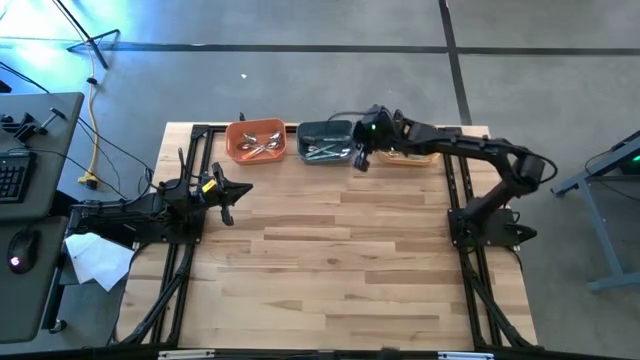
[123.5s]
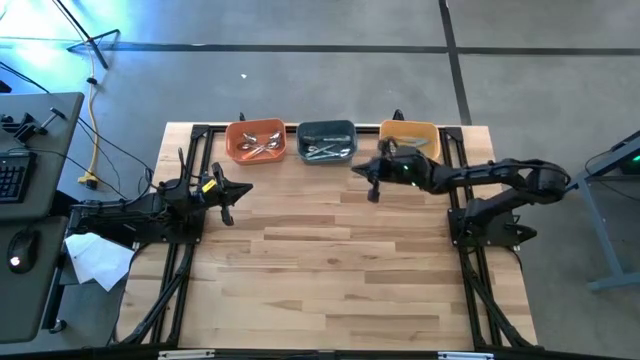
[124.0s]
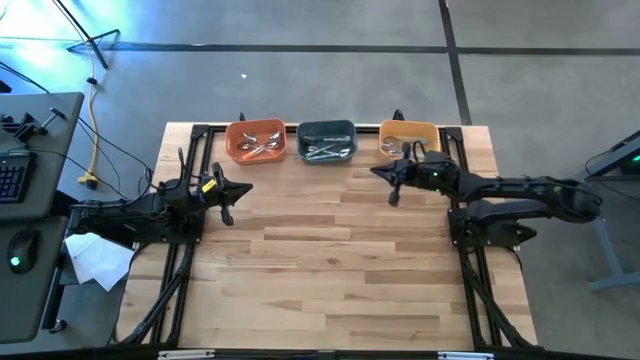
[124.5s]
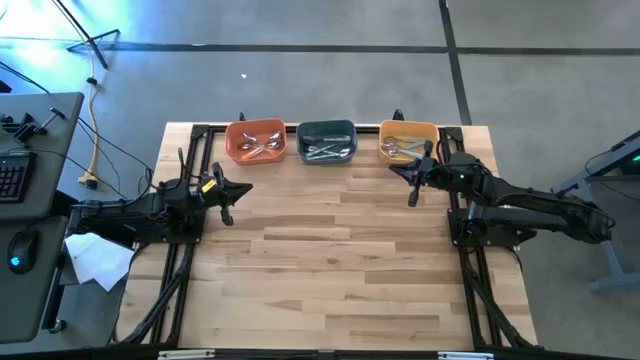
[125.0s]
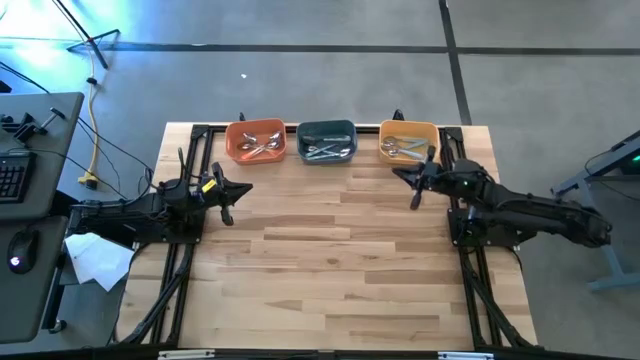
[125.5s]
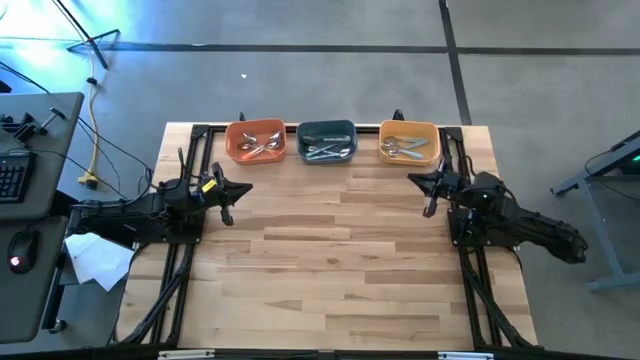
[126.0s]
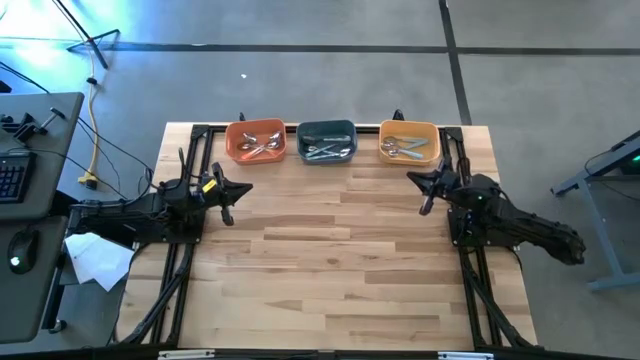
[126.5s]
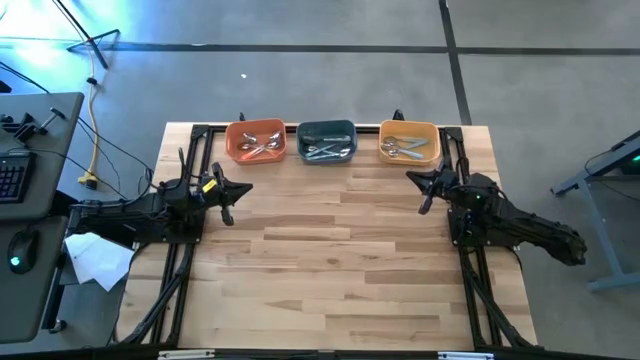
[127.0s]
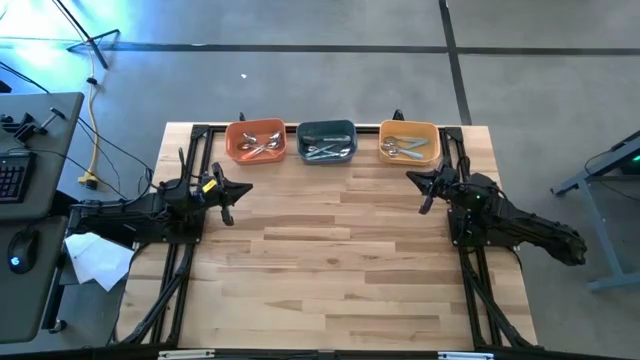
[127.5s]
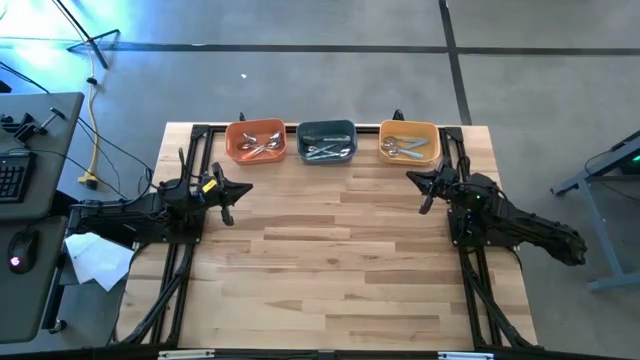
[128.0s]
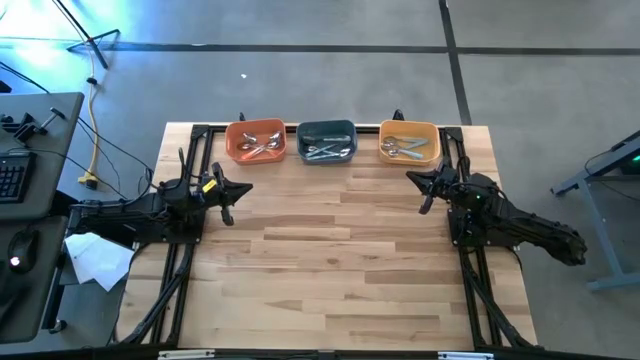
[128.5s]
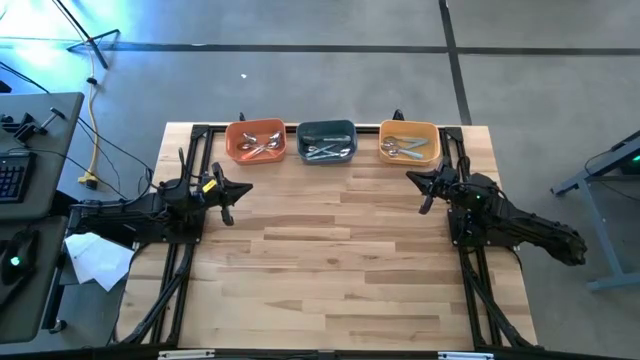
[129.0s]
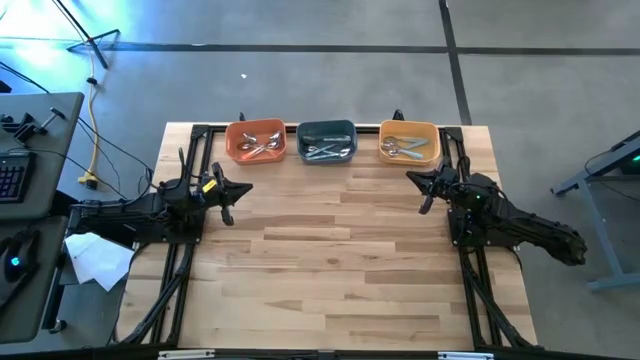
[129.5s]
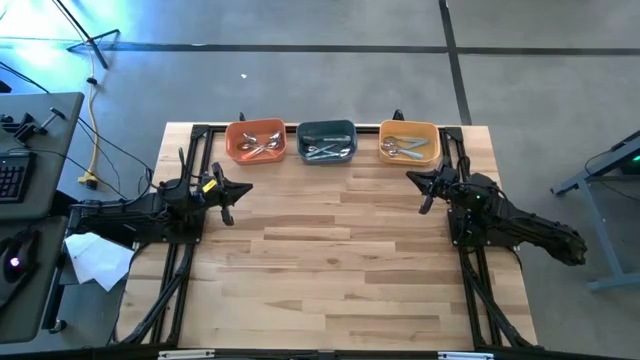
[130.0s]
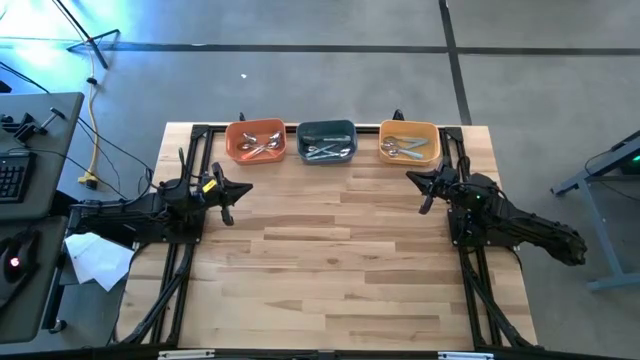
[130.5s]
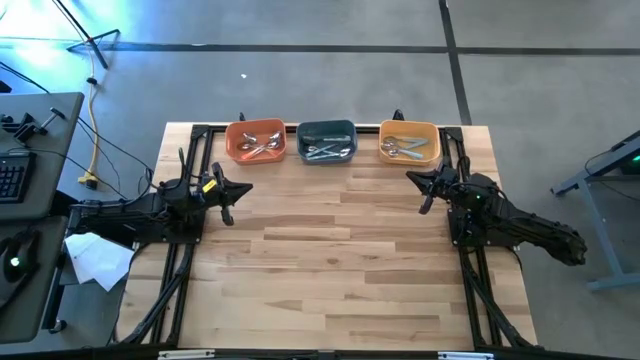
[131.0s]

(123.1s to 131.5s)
Task: Sort silverware by color (type)
Return to Home Position

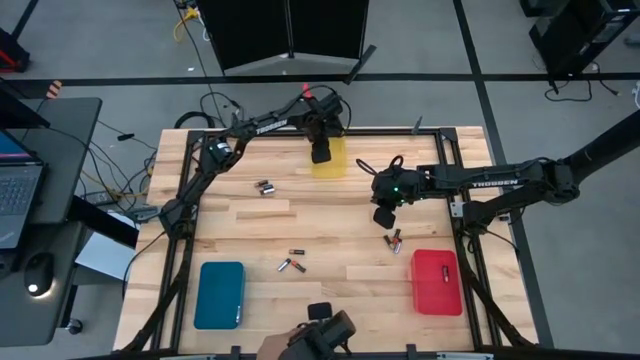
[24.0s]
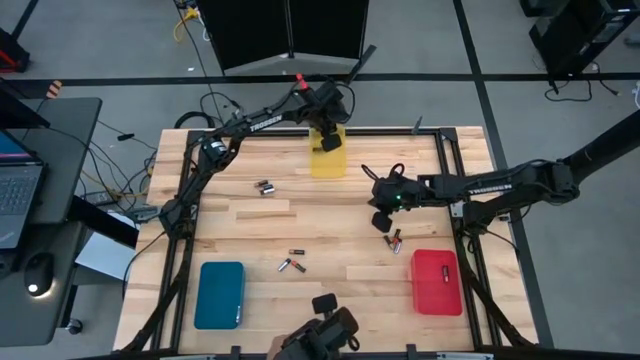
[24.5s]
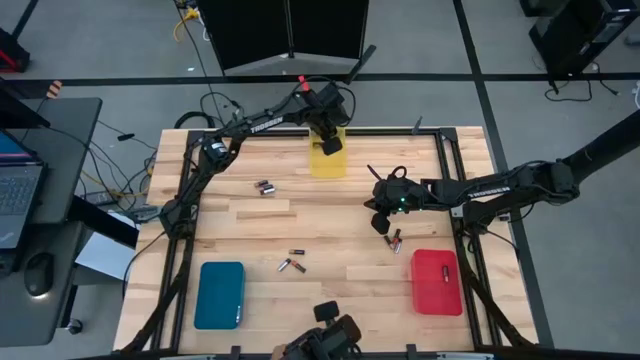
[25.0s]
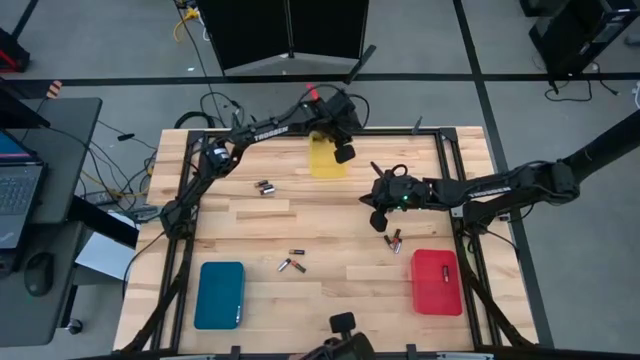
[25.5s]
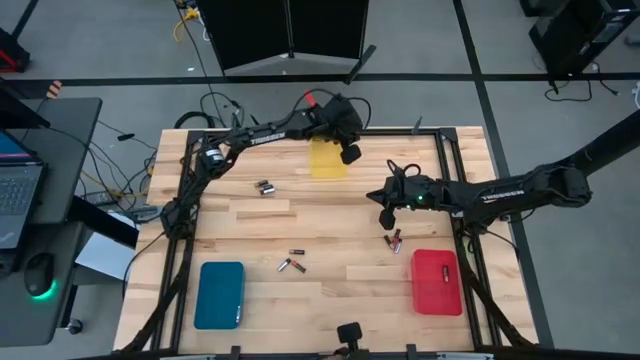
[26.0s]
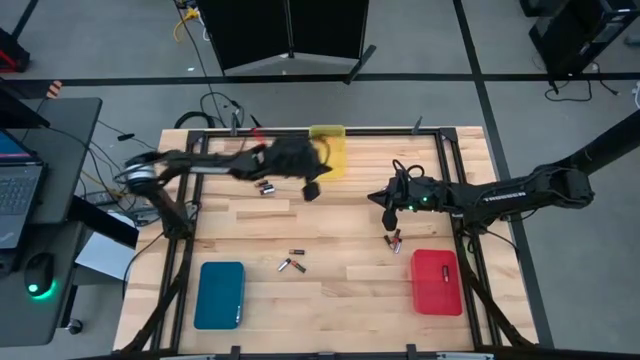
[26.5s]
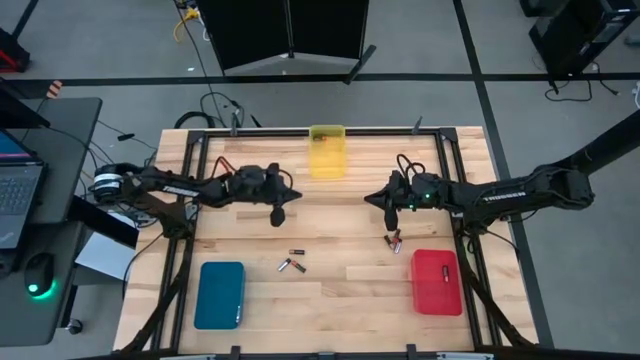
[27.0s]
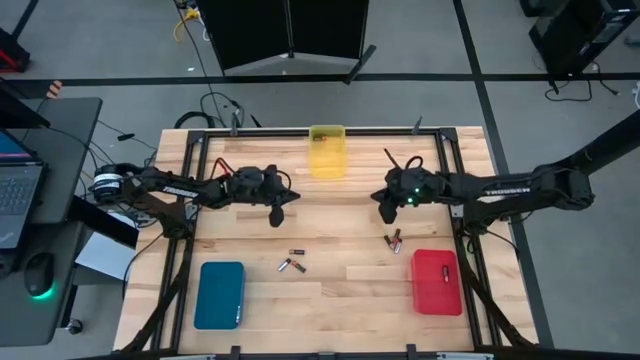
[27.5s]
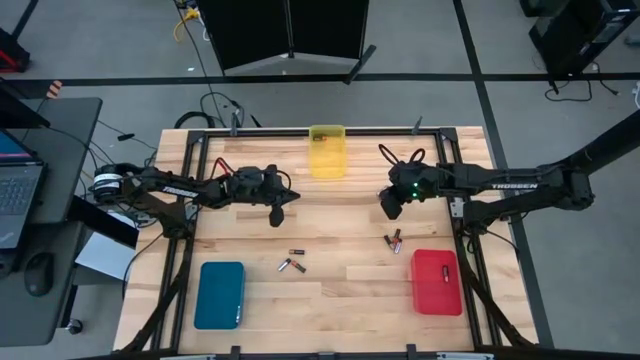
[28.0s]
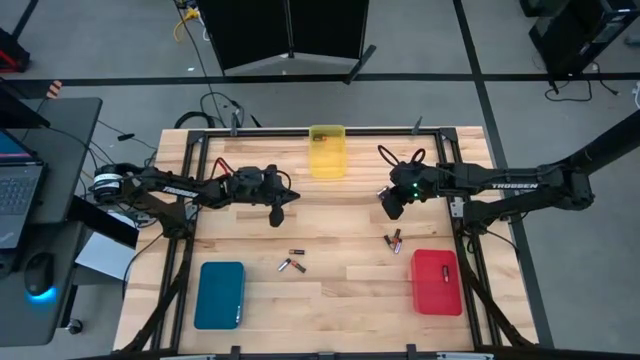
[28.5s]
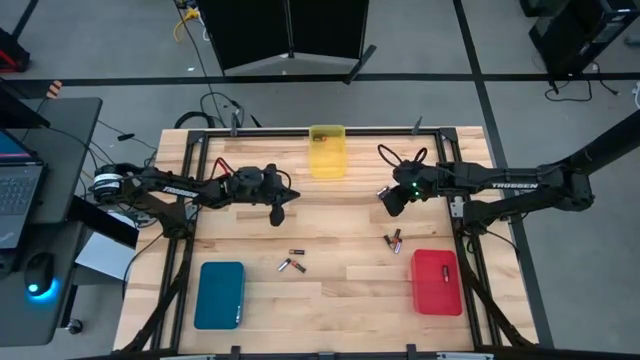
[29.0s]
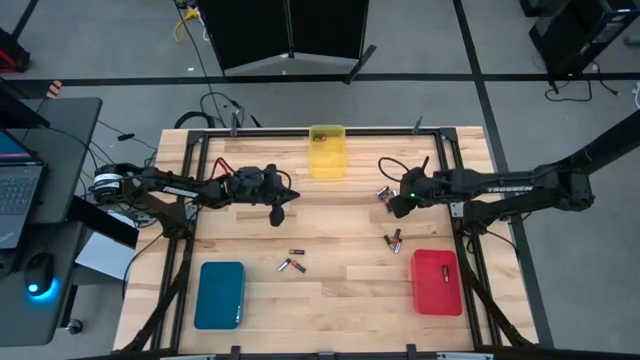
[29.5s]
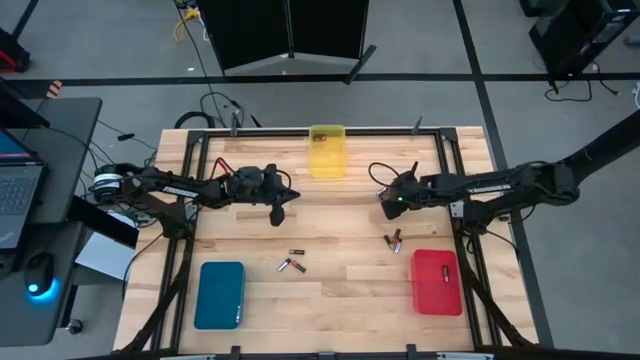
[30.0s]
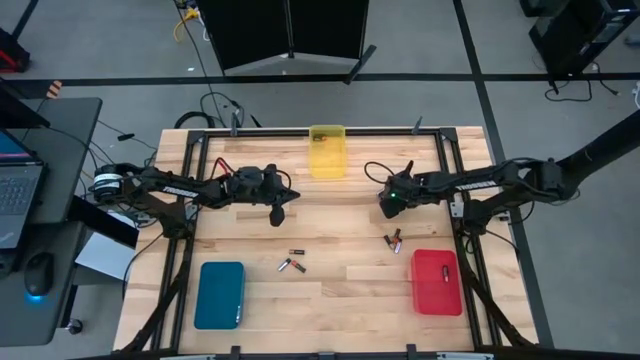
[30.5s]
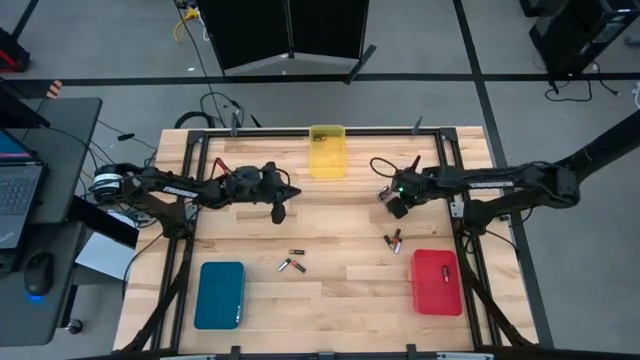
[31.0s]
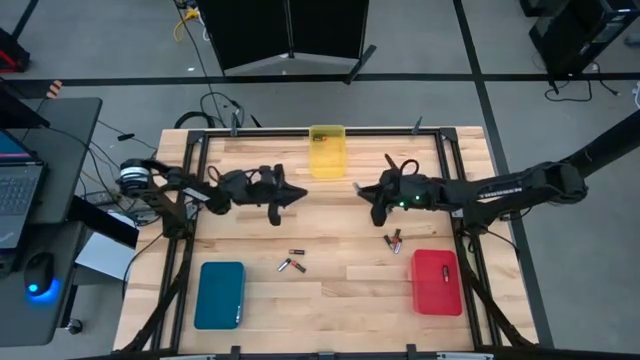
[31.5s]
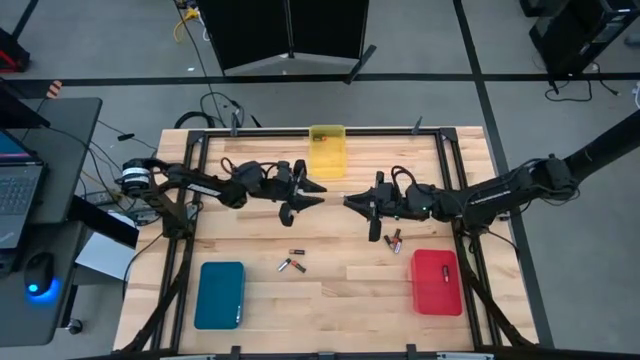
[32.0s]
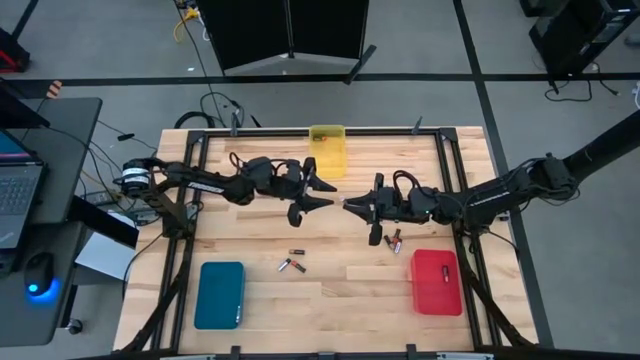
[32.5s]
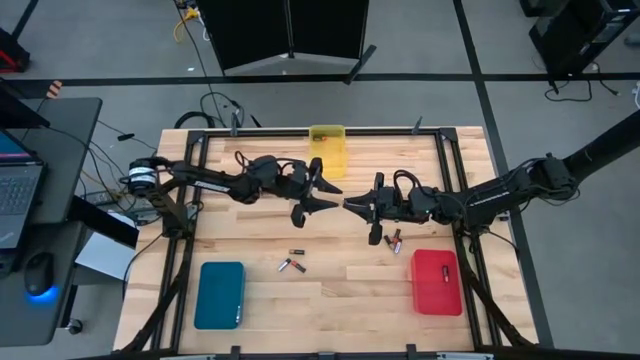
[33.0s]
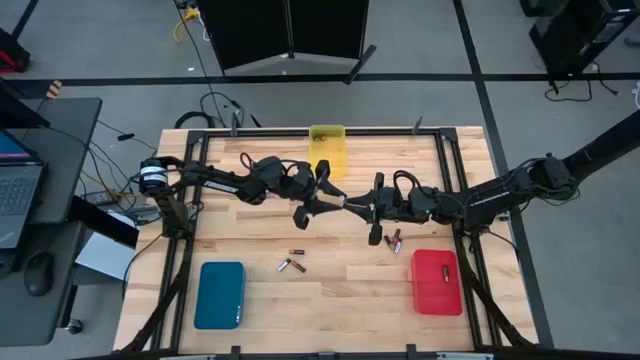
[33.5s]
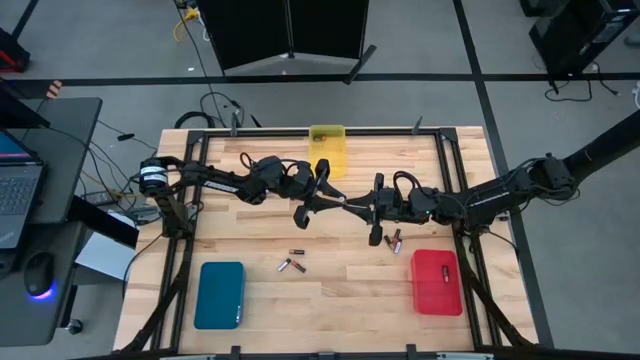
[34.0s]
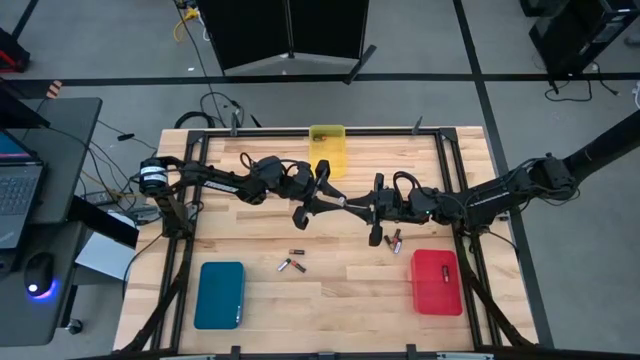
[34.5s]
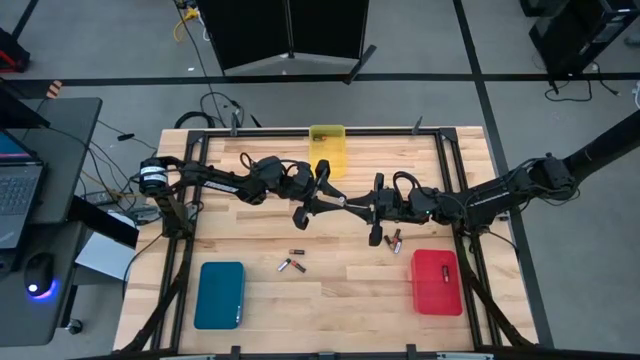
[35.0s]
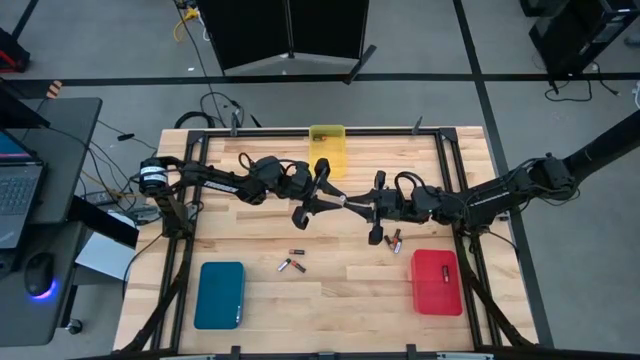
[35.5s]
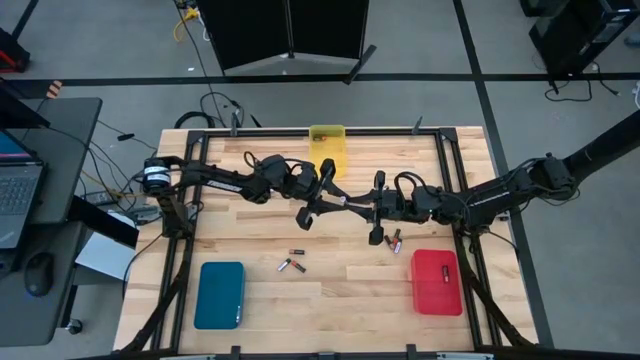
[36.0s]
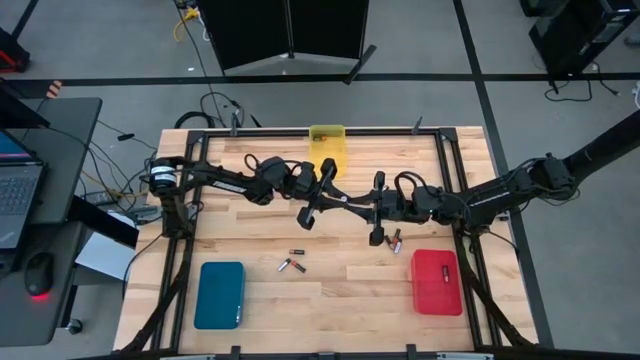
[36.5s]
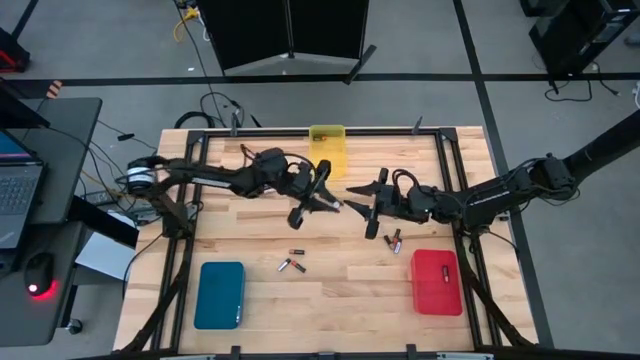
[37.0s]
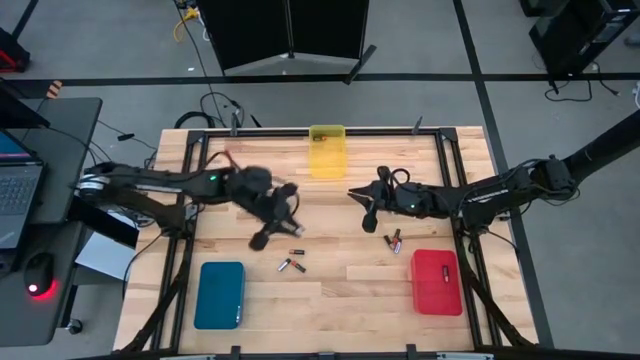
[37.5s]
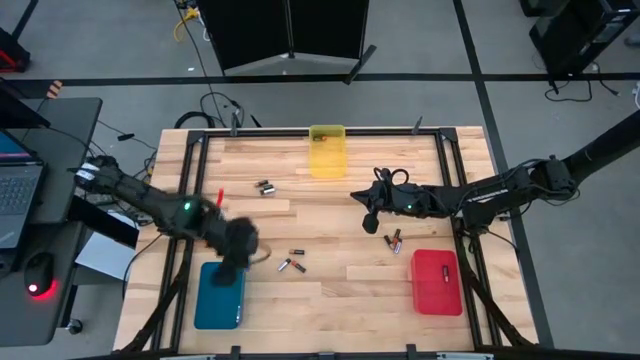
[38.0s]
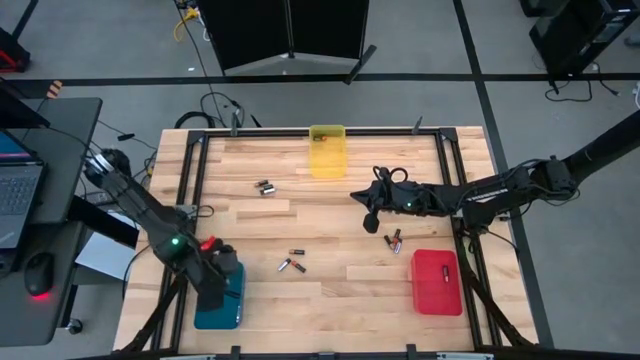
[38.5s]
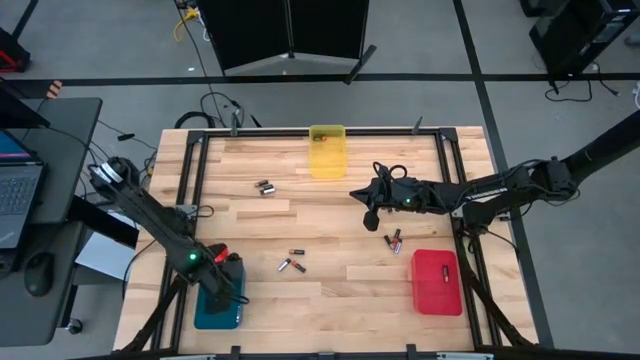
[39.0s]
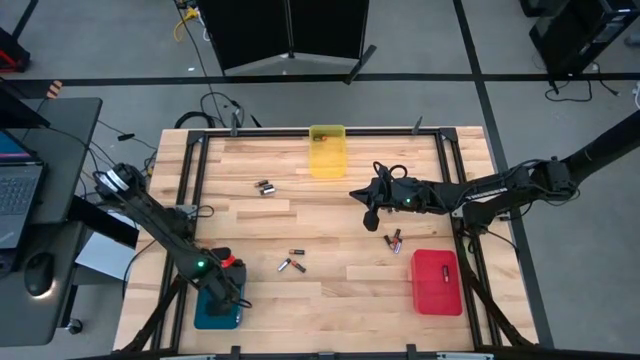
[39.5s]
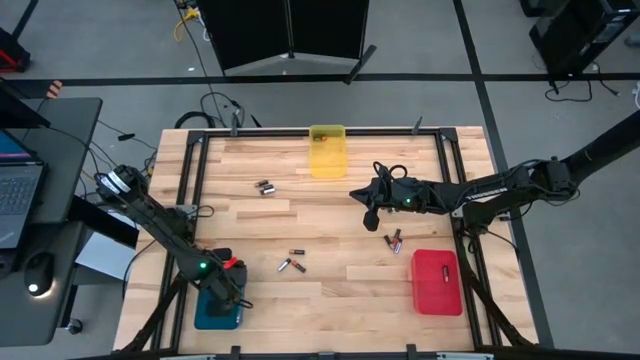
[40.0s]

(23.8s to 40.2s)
Task: Sort batteries
Put the silver battery into the blue bin
